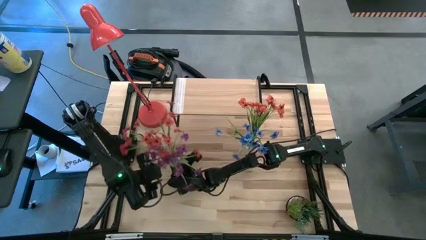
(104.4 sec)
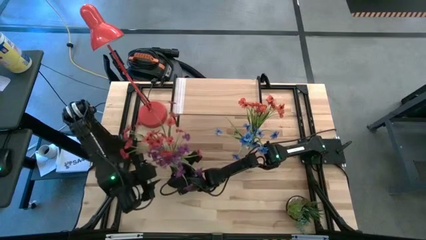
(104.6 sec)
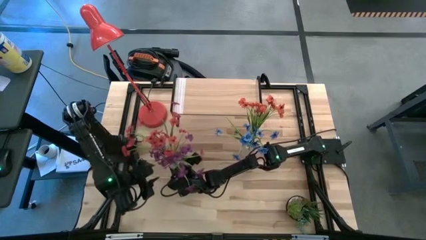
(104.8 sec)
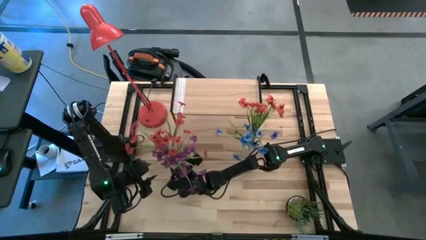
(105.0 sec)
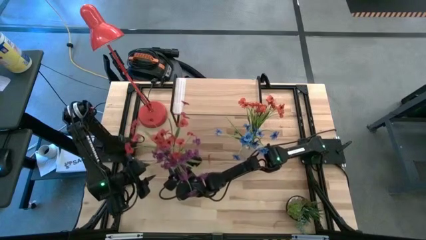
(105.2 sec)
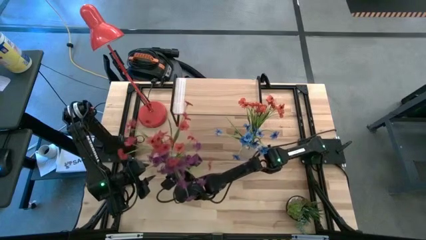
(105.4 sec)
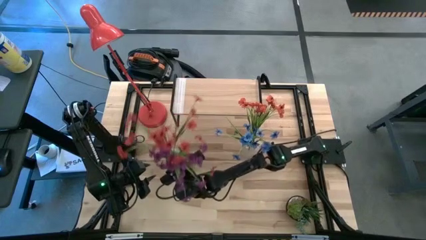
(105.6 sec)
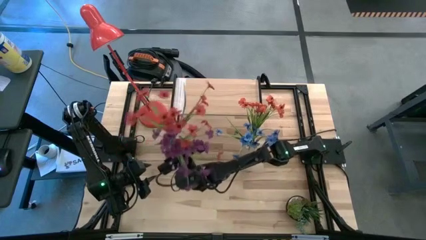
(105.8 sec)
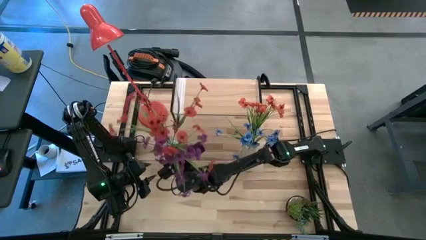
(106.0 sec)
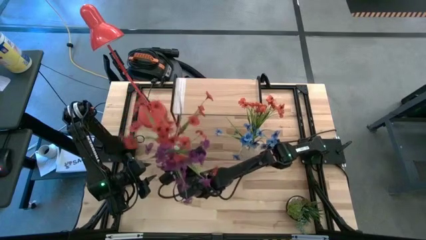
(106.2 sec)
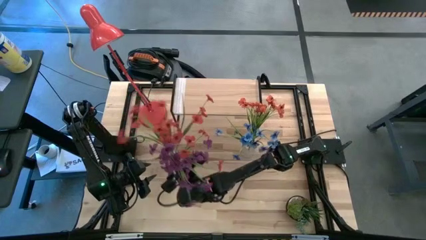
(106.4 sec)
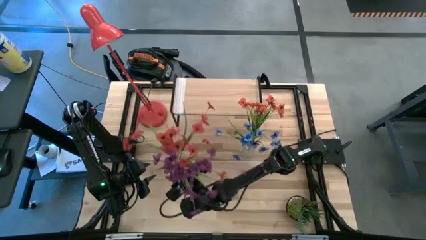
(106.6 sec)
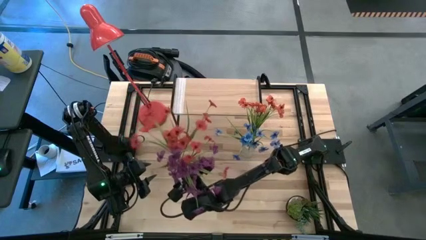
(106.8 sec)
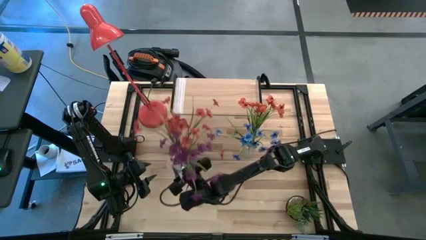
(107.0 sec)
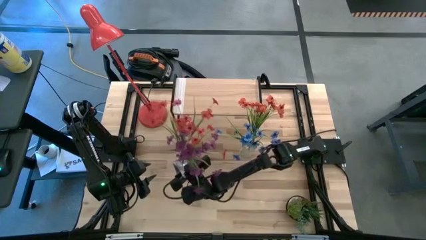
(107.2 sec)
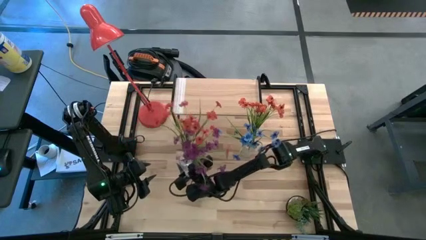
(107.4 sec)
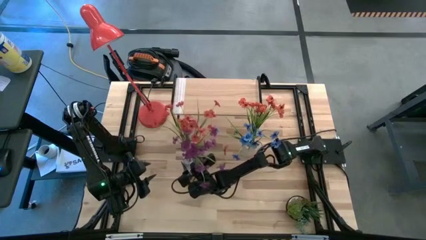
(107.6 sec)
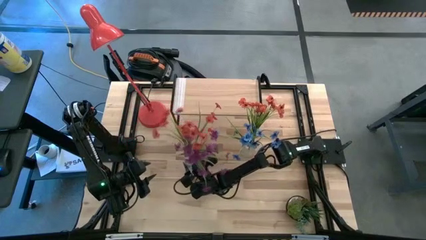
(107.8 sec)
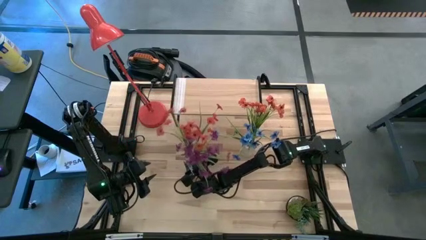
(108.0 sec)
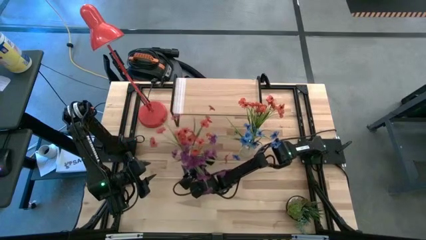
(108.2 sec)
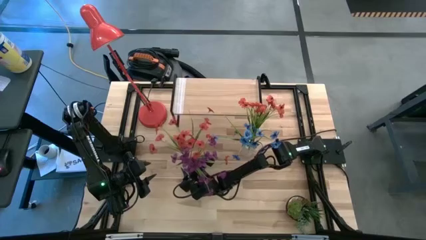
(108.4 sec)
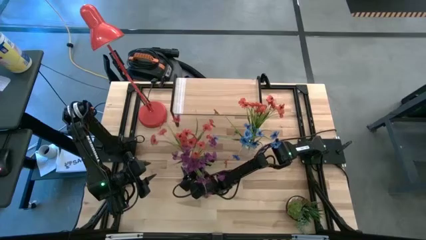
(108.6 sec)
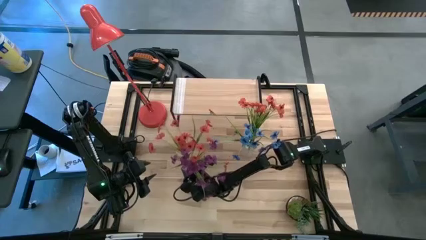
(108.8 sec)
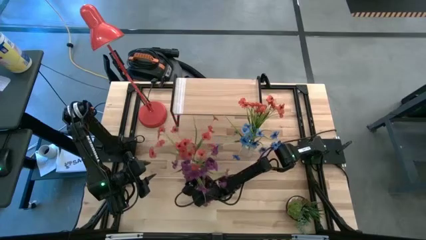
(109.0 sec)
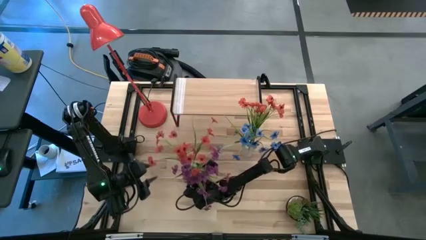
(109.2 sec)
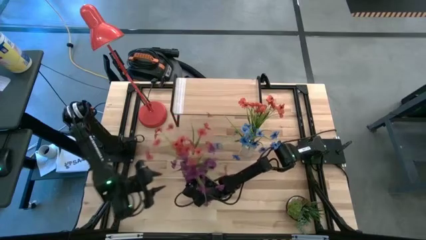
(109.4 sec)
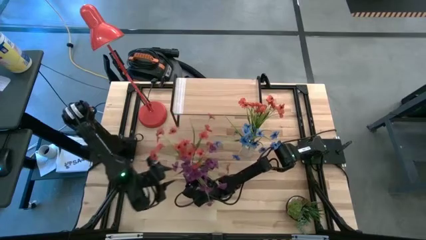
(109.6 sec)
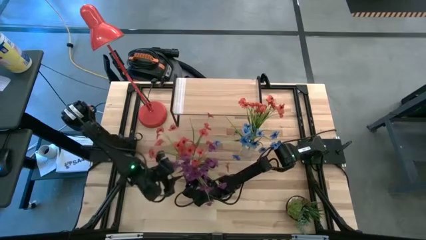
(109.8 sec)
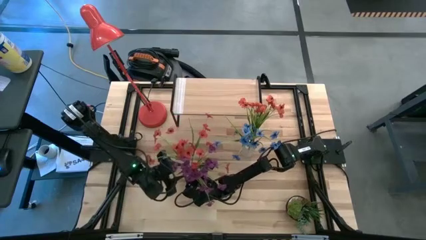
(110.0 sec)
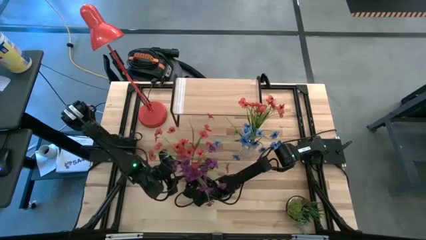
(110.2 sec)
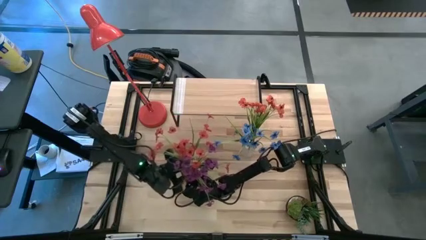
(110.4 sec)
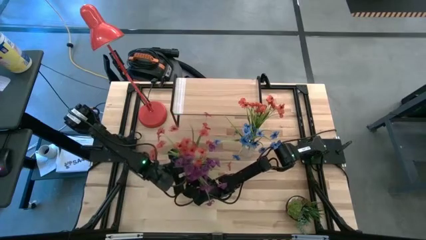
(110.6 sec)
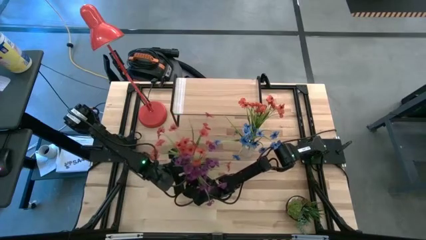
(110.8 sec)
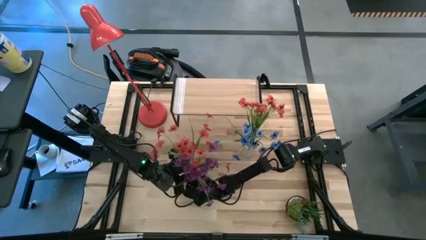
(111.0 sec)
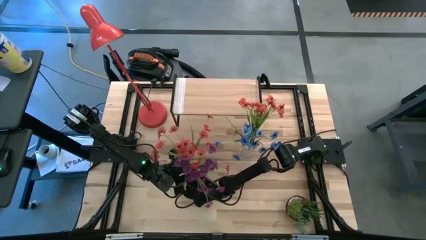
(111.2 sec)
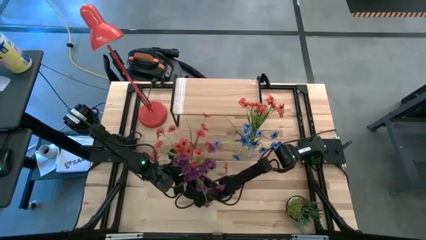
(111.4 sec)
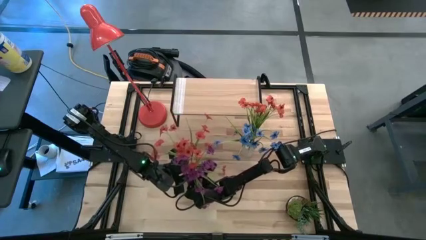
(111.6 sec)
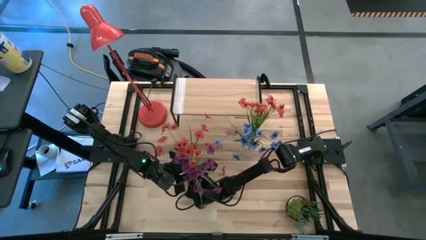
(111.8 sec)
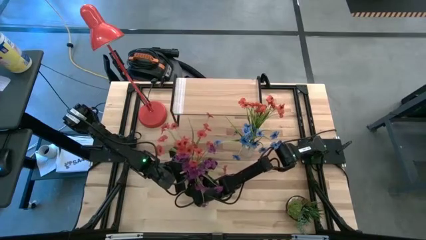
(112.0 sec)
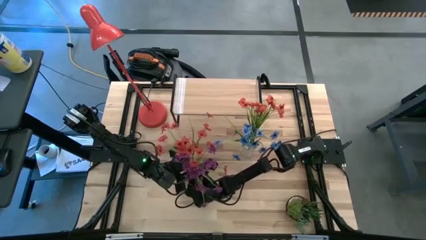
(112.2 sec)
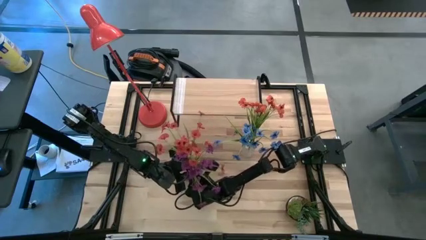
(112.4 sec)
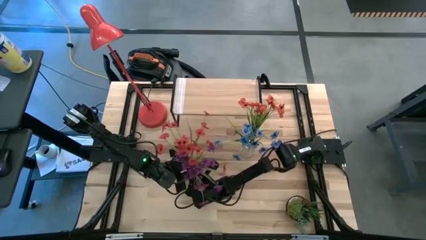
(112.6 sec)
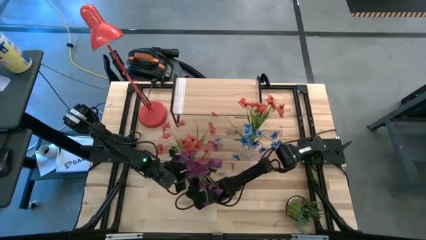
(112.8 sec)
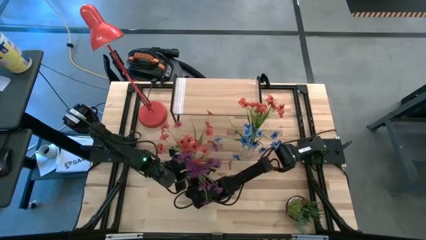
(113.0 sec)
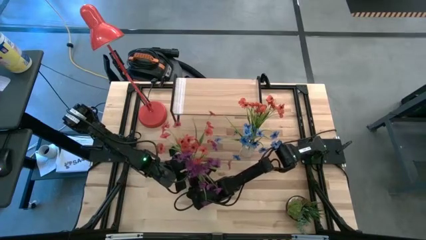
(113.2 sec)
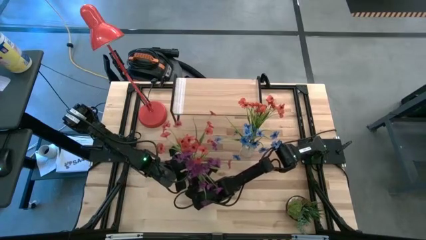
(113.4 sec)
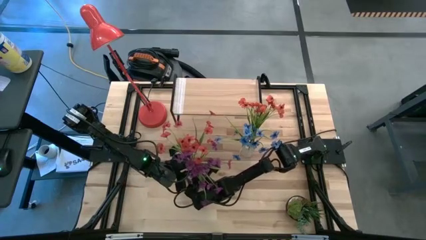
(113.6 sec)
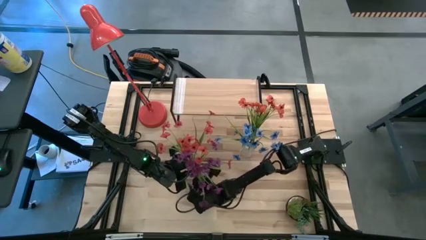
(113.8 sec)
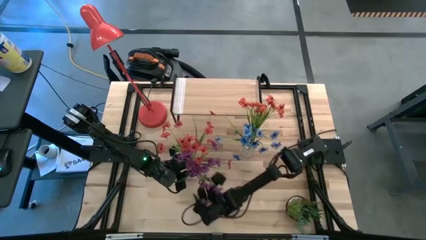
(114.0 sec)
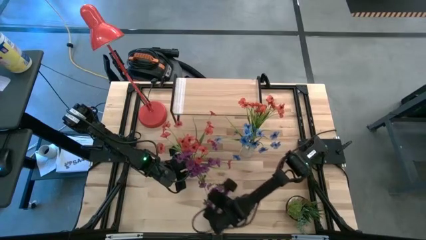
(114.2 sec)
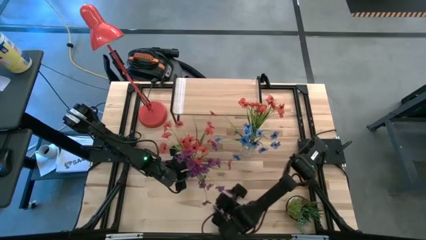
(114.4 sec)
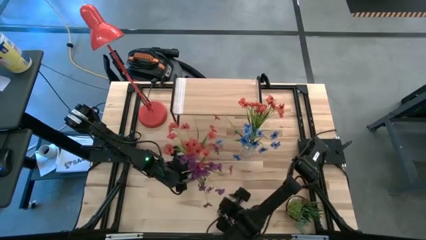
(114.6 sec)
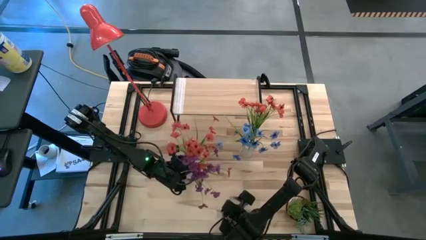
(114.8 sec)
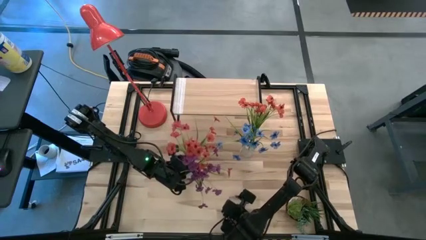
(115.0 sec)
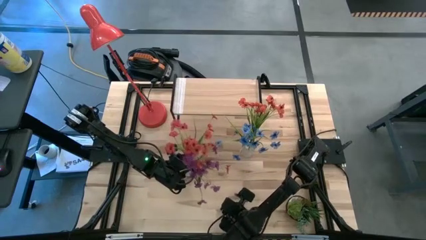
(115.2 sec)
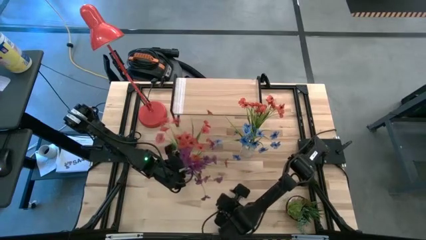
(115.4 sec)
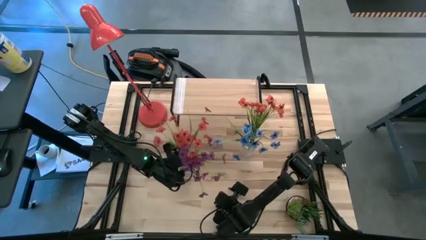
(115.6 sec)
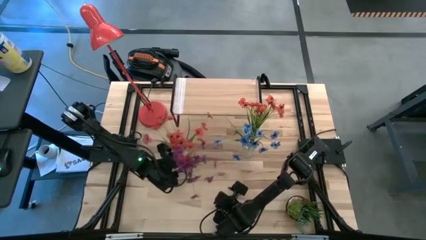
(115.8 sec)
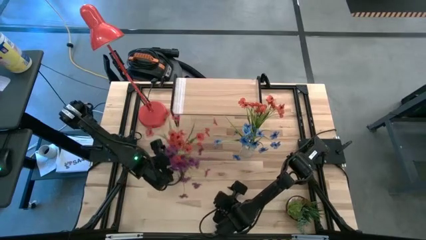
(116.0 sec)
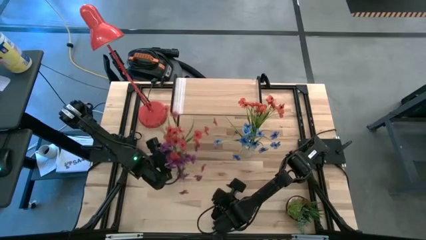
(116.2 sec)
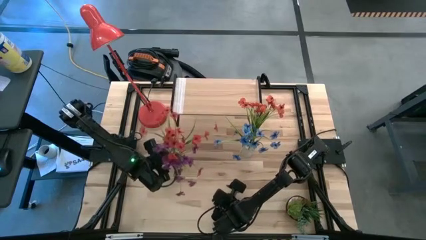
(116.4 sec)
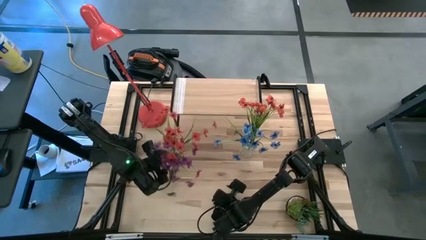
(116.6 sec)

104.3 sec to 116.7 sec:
Task: Pick and place flowers into a vace then onto a shelf
Adjust the left transparent flower vase
